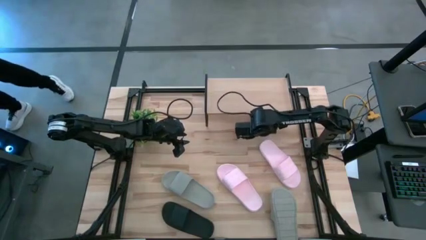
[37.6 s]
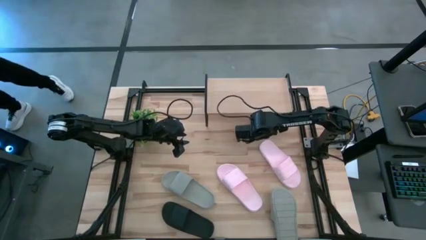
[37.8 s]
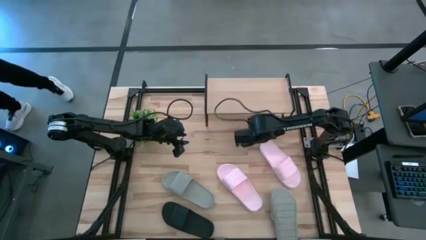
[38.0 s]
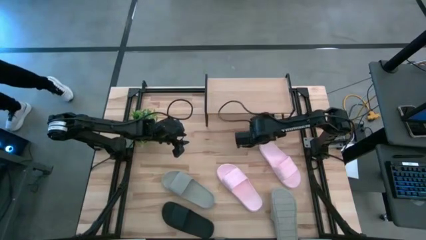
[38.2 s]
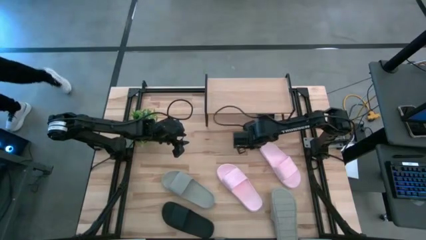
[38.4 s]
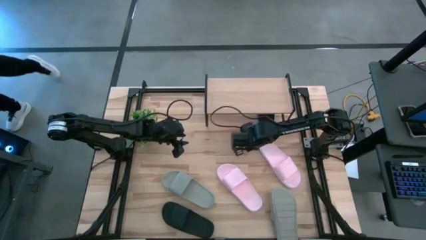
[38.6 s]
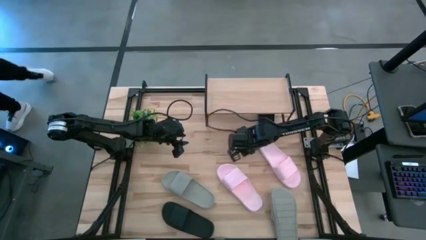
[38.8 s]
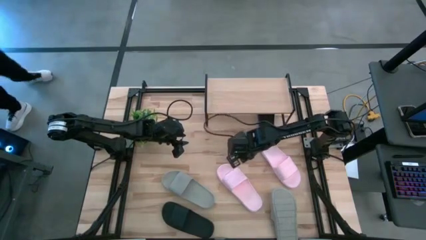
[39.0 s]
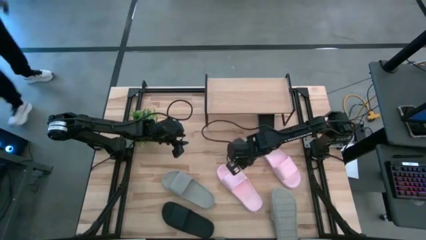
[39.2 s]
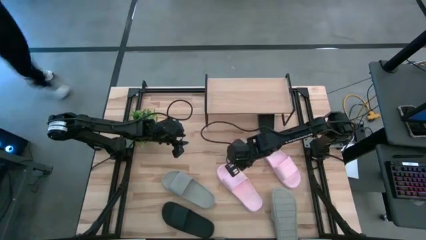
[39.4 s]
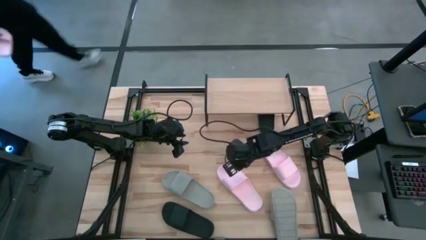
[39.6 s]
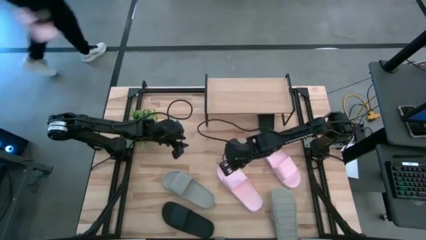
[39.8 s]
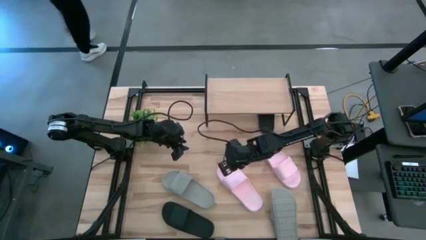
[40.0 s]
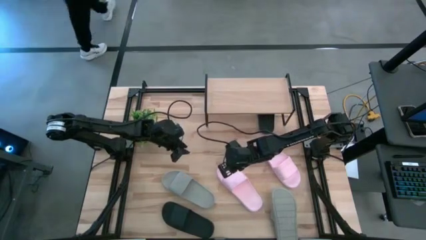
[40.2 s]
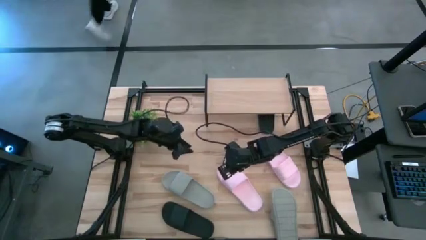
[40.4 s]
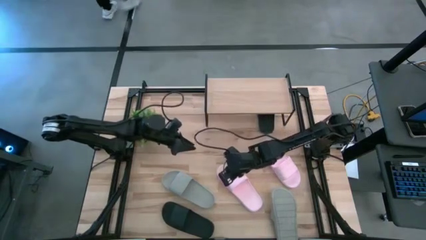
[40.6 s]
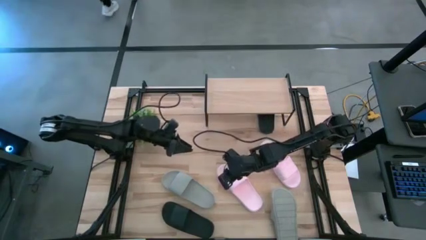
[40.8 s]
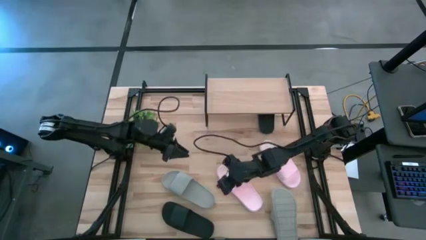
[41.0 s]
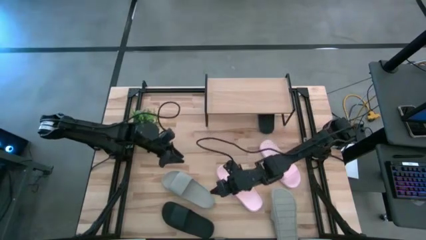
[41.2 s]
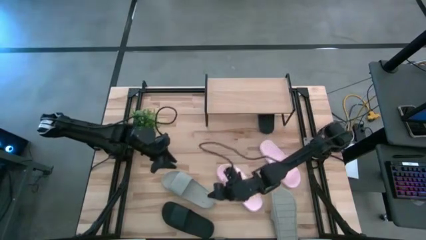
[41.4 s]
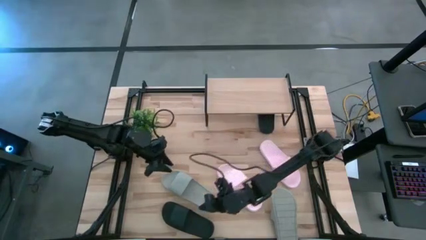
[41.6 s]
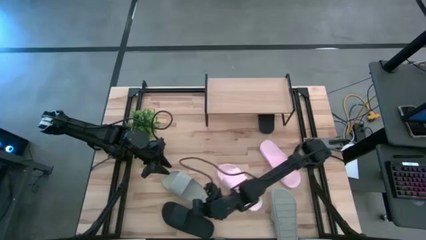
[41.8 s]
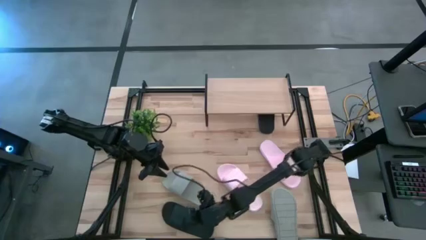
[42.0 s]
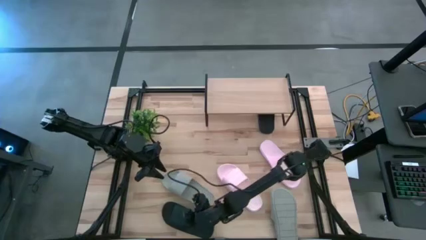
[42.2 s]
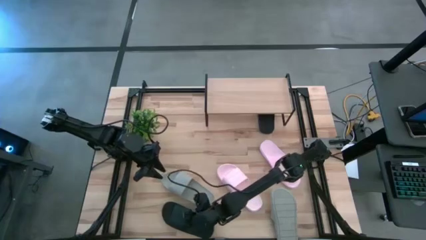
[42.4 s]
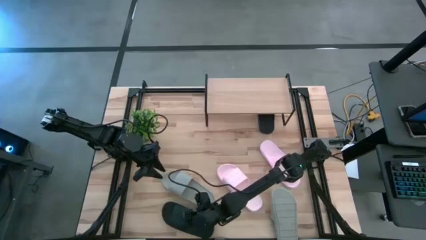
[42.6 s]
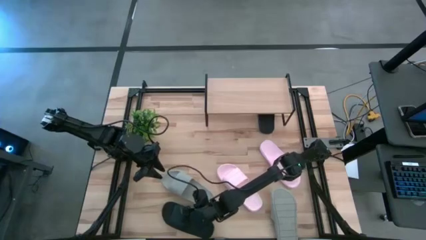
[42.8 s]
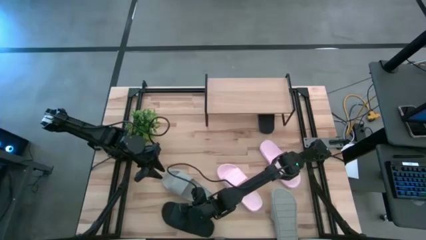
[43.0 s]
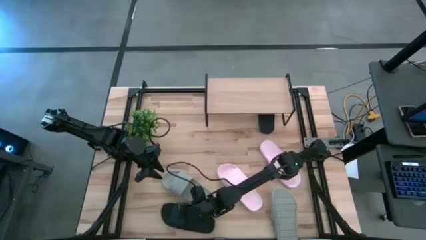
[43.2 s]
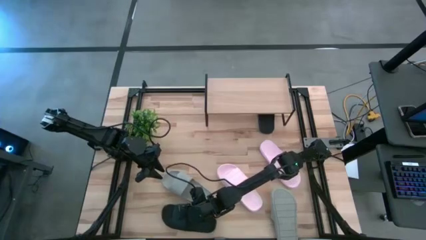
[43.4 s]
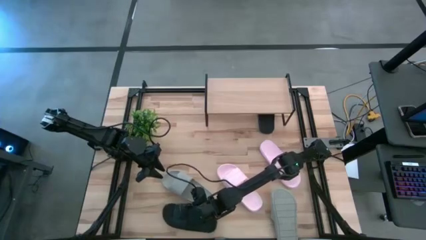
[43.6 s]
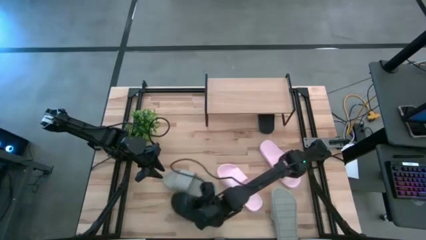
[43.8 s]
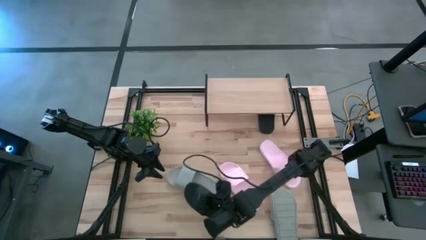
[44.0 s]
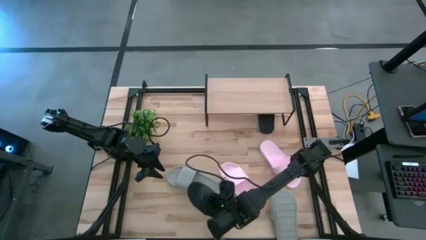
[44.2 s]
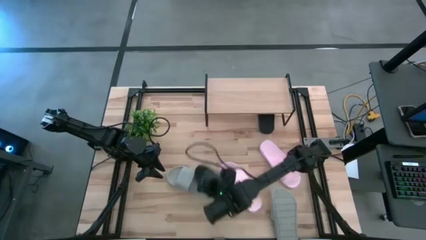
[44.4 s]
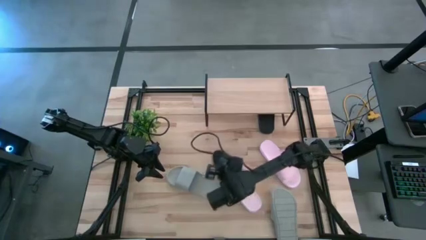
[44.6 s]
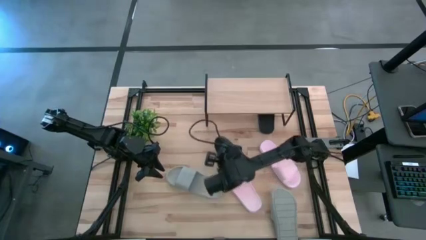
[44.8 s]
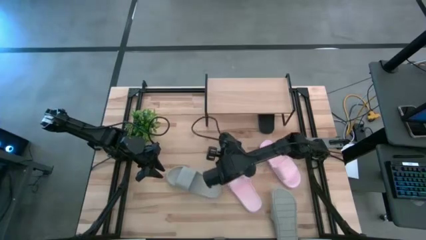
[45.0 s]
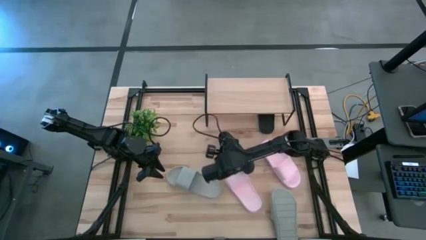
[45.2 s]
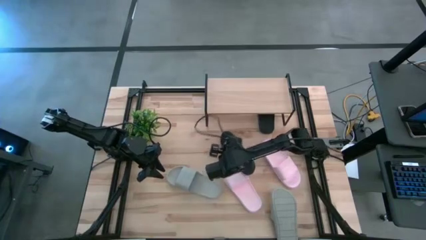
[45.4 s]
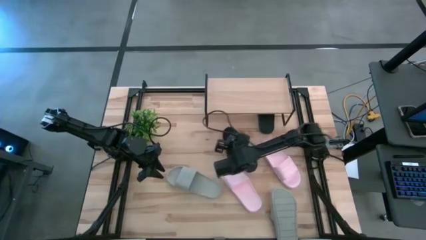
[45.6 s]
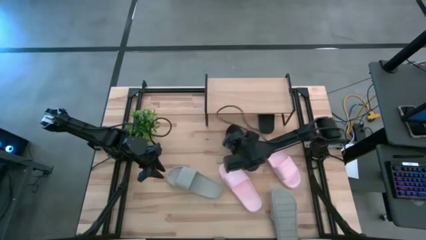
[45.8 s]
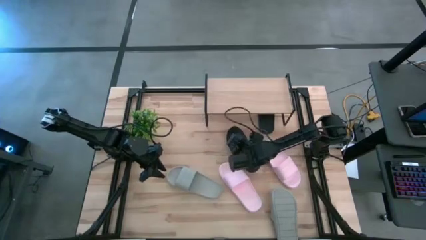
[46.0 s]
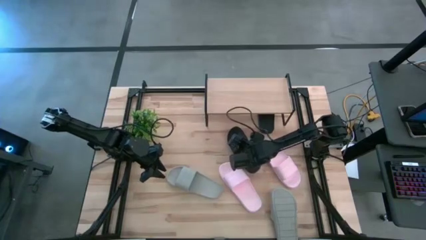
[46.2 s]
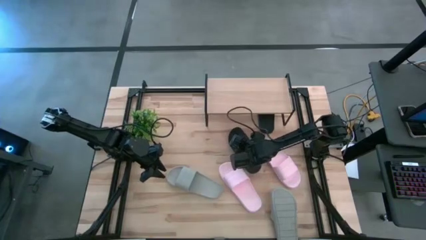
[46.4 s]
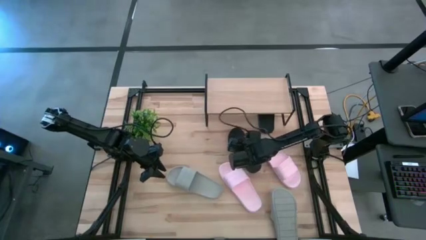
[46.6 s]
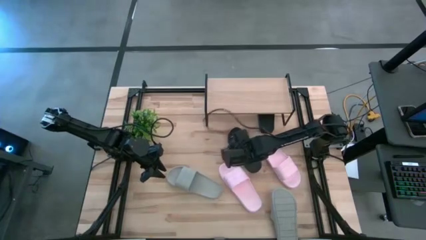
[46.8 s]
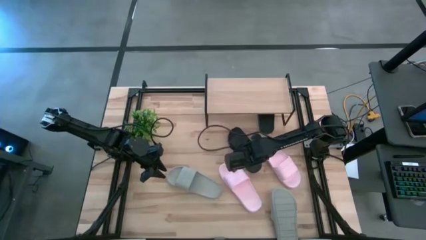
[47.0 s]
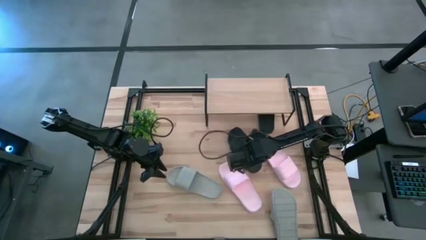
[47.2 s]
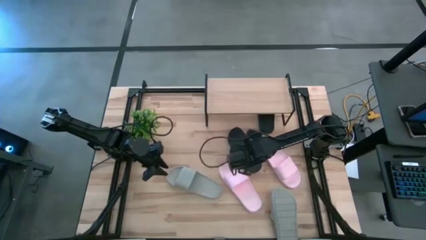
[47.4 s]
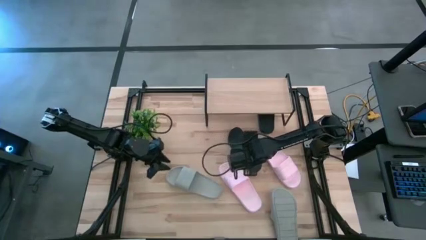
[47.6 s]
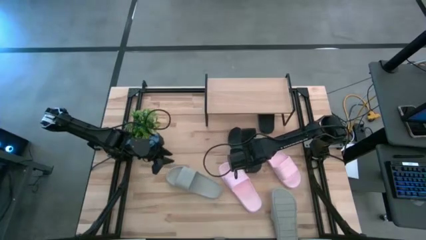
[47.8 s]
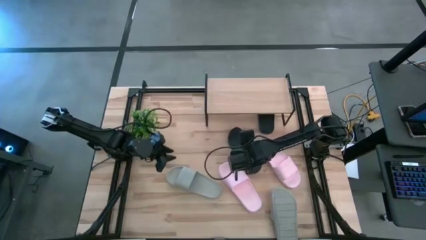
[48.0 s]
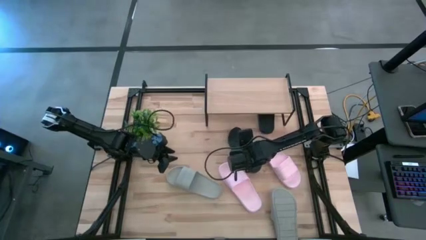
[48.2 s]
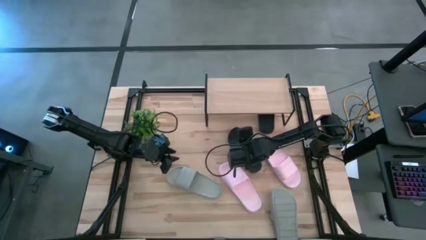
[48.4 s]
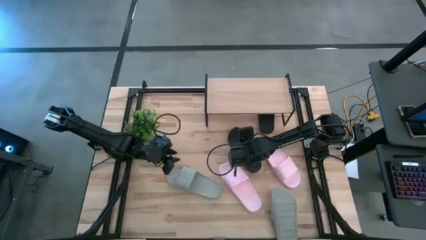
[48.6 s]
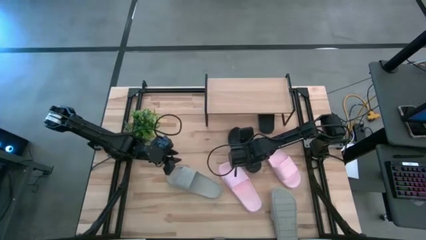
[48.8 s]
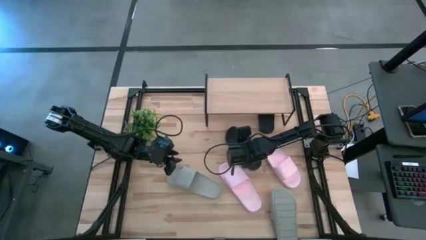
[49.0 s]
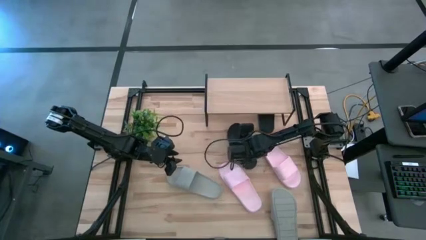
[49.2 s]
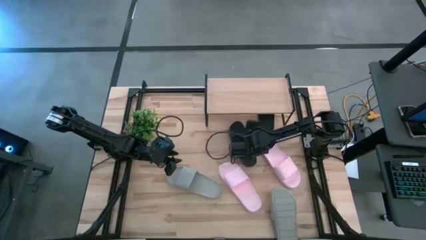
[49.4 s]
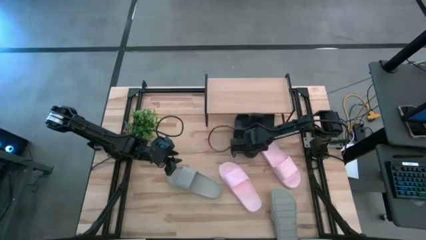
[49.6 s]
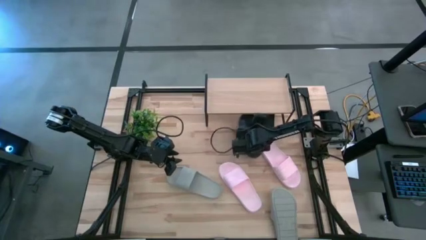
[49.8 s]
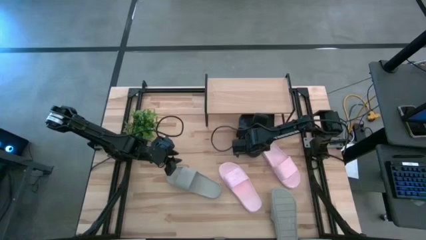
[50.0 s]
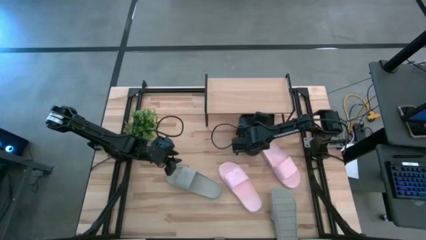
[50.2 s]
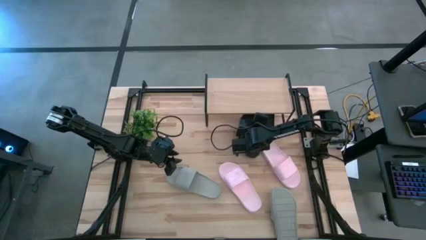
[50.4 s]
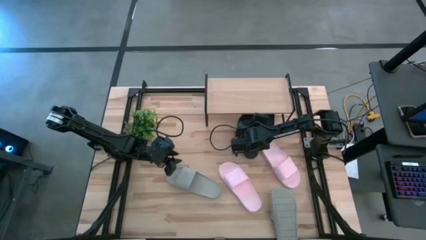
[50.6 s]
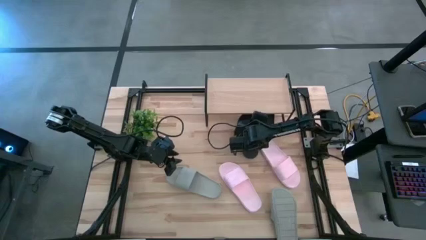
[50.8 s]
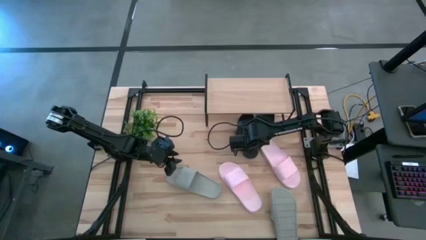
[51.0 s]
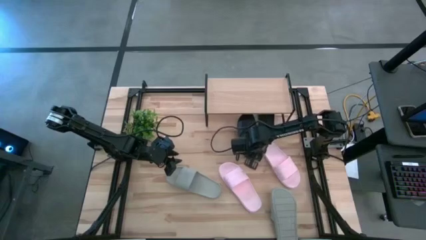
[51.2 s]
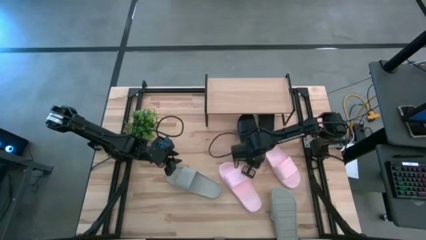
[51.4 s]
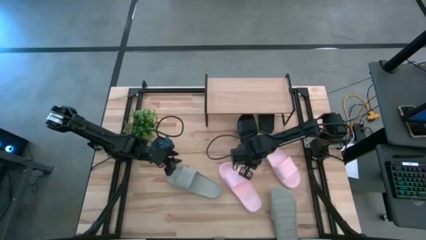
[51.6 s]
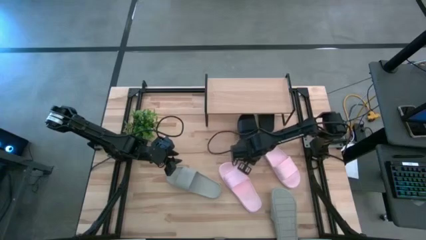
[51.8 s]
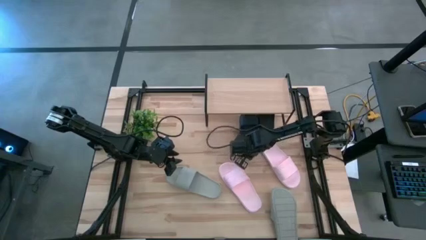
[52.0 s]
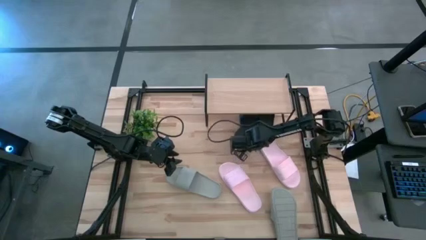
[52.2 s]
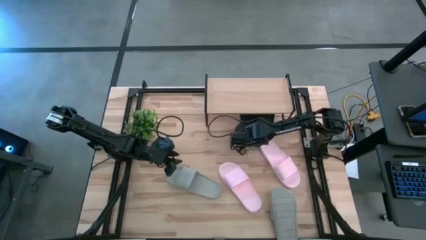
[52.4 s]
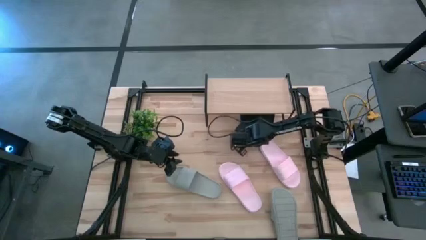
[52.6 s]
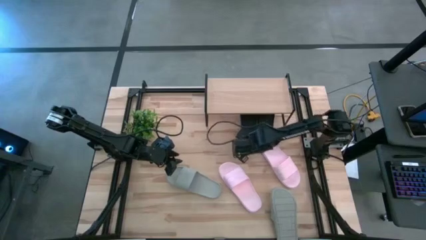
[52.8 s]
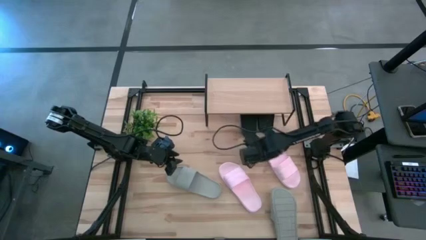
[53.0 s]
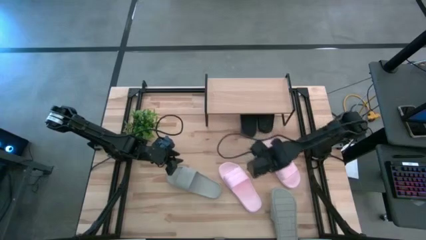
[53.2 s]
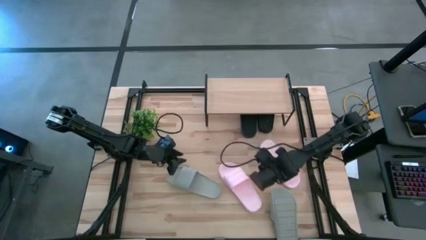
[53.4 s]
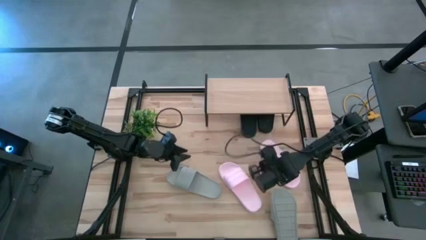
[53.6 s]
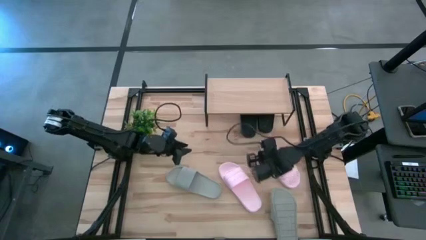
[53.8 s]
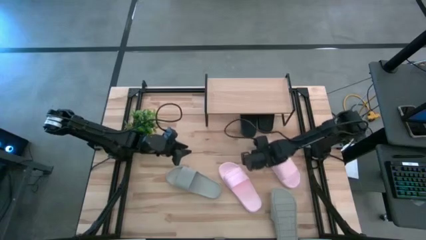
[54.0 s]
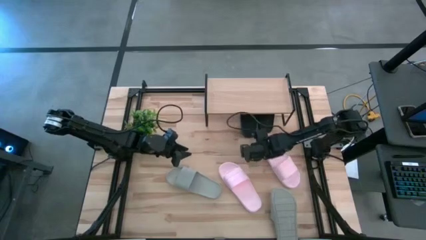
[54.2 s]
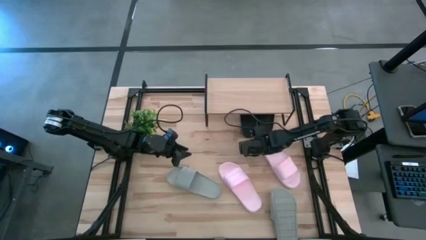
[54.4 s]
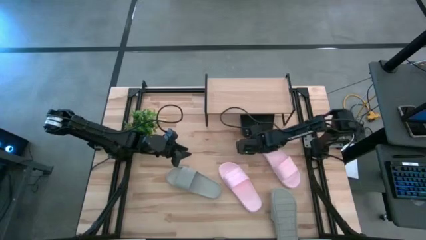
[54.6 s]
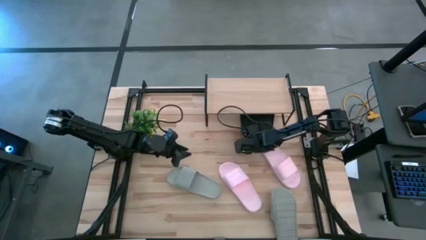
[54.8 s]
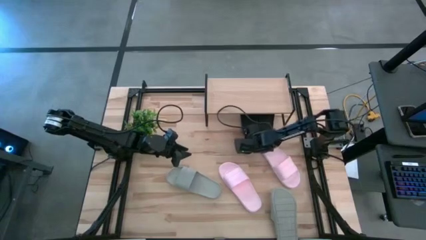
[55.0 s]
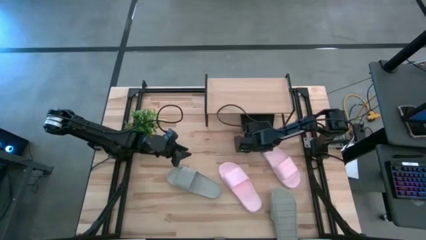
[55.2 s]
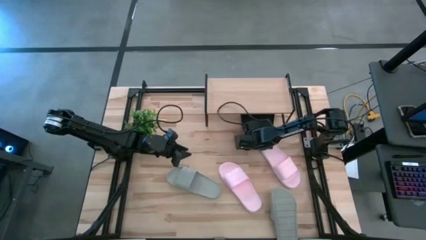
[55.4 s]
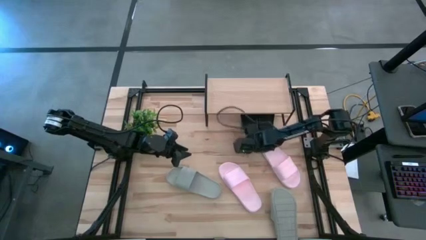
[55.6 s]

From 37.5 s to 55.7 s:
Task: Pick and place slides into the shelf
Move the black slipper under the shelf
